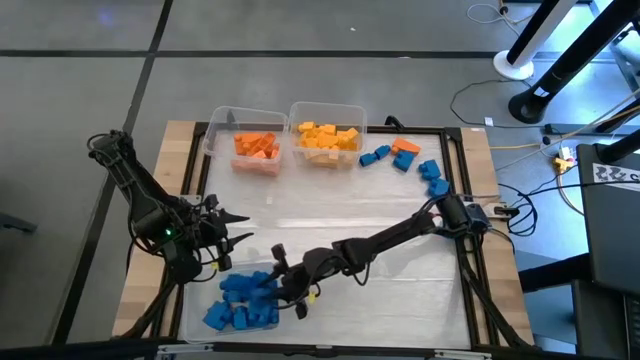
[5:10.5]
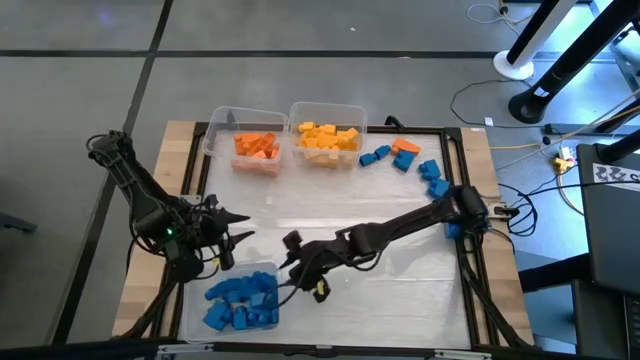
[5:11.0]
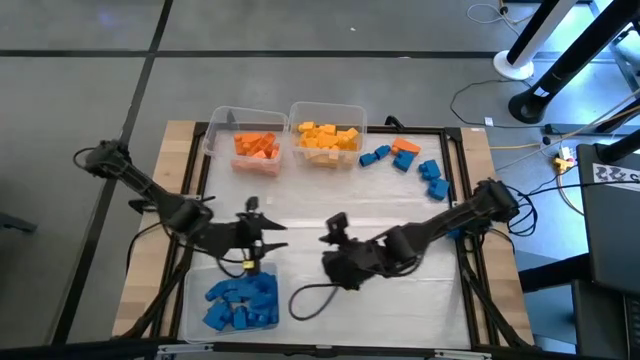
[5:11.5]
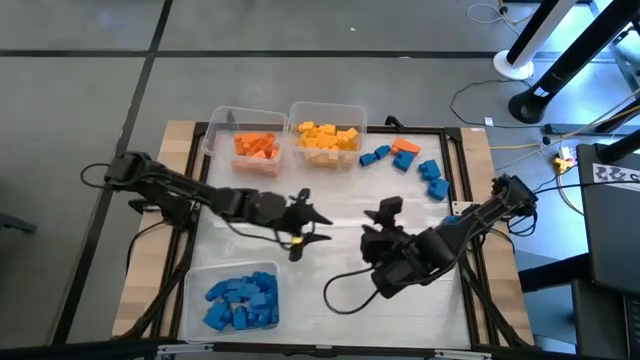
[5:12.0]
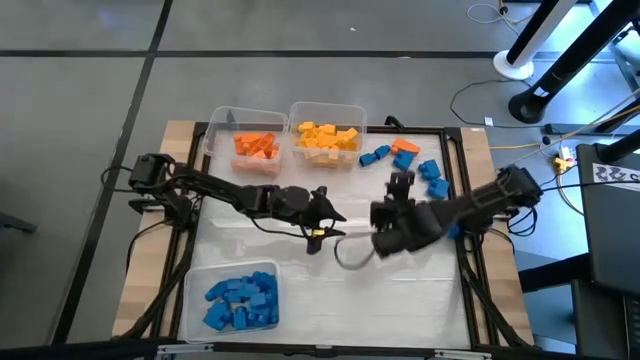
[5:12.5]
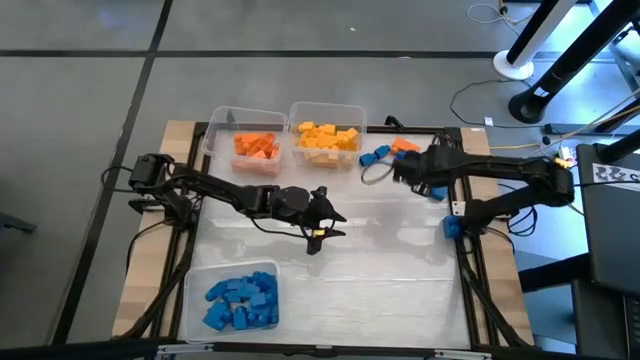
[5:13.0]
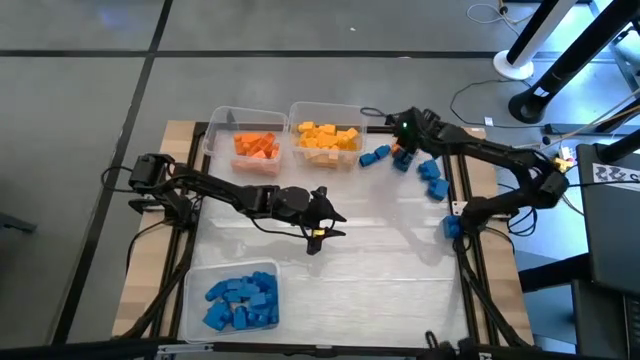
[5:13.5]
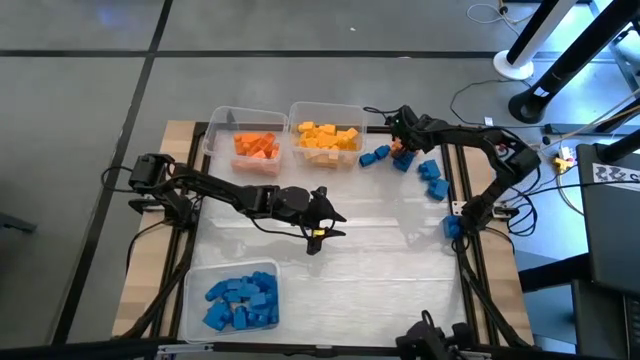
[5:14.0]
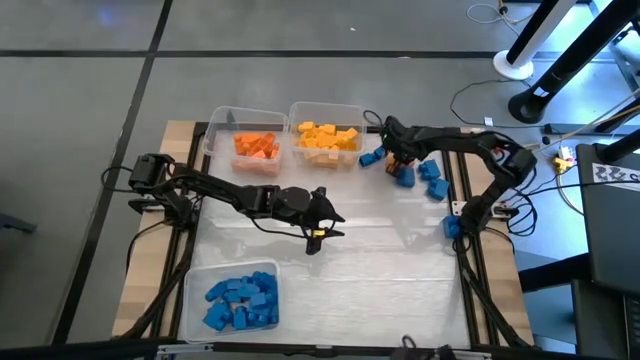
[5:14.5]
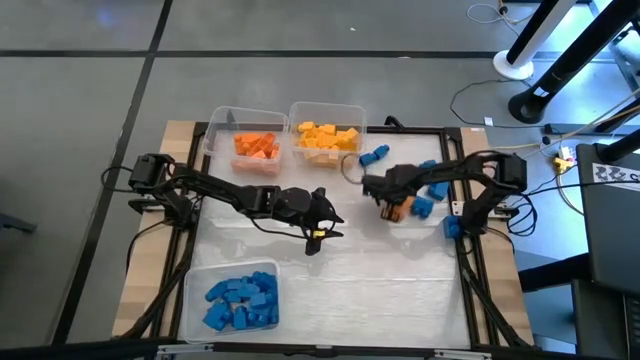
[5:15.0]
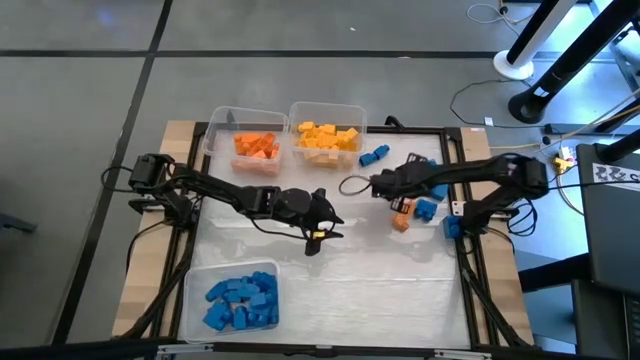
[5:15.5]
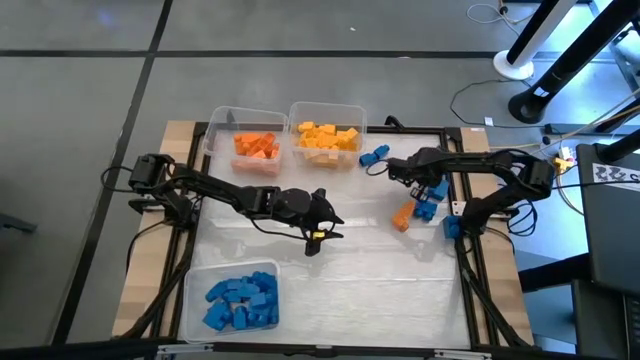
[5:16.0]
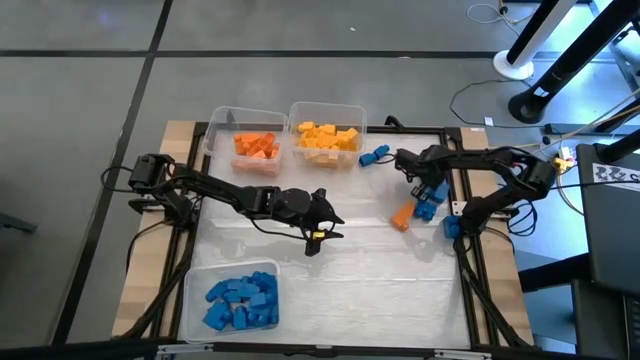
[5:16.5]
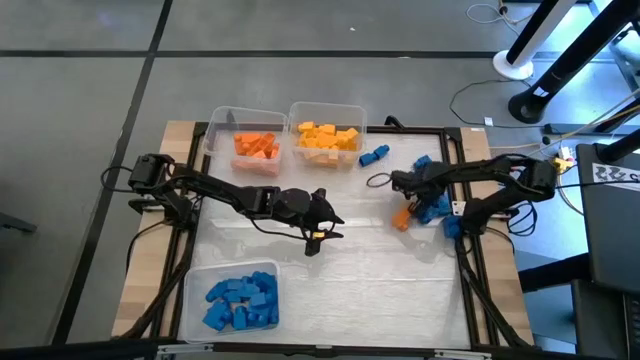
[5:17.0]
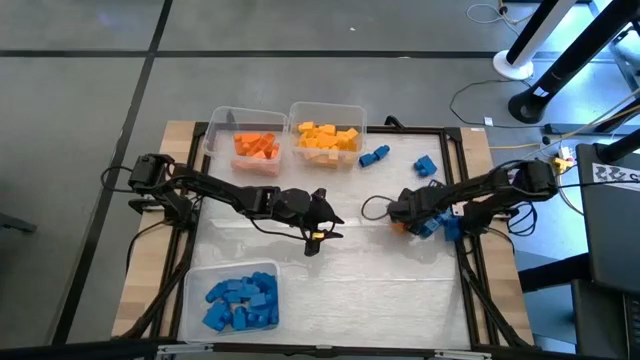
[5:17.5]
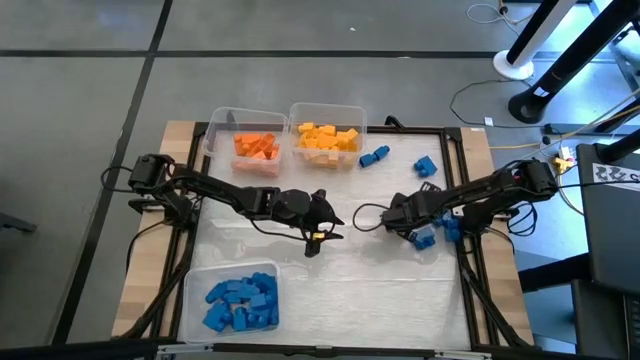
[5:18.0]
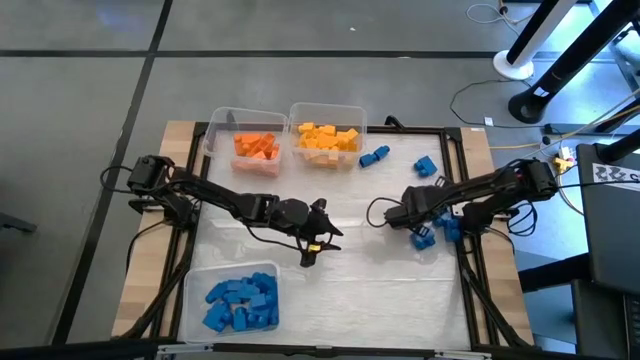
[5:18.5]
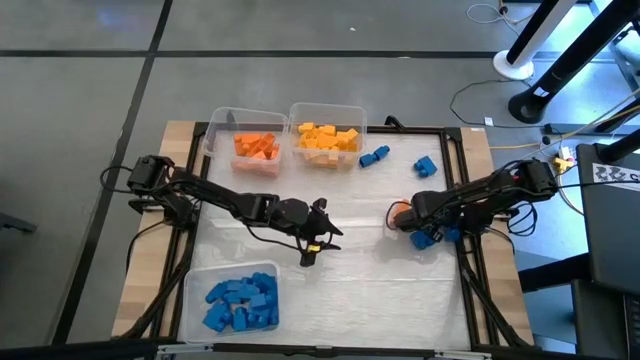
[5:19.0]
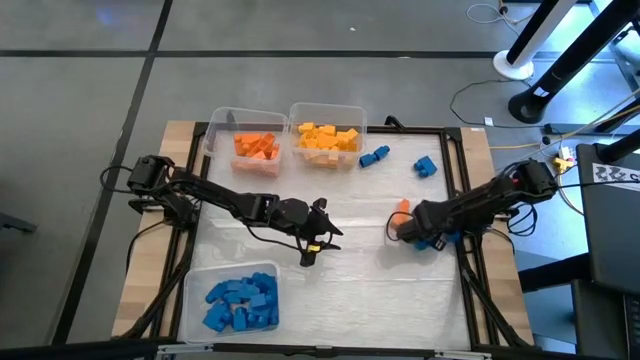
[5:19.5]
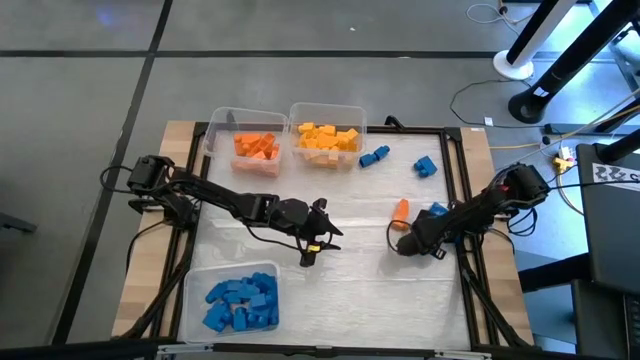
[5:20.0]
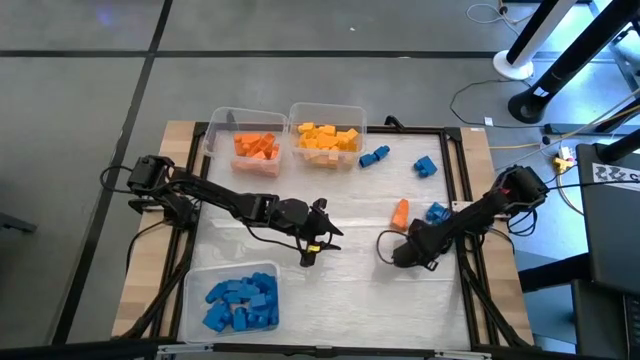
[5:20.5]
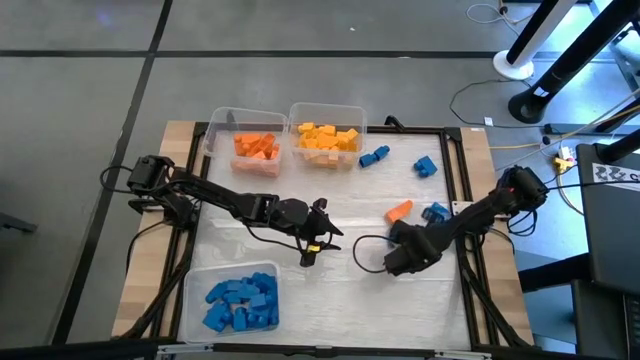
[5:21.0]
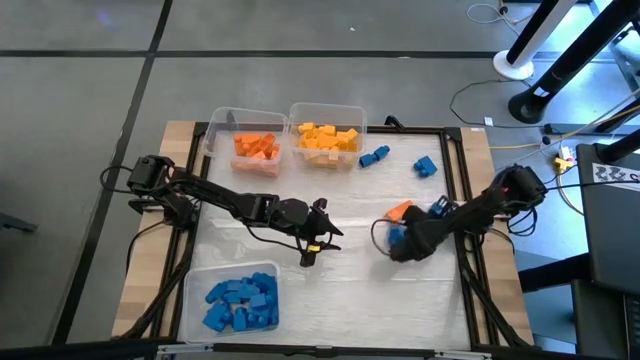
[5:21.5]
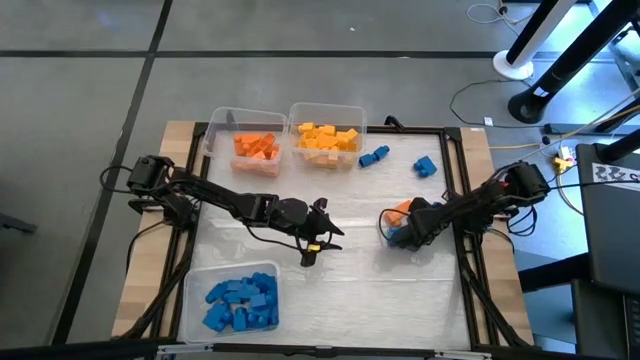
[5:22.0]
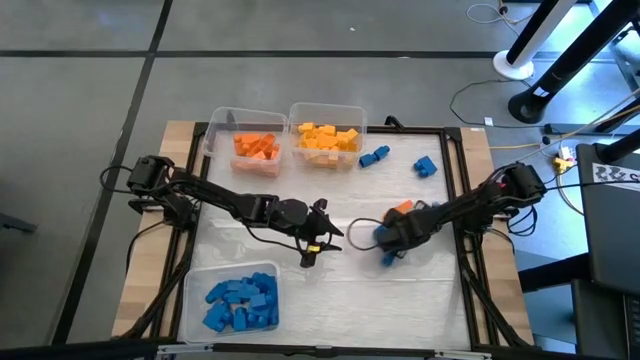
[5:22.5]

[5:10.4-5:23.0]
Task: Sort blocks
Put the blue game piece into the bottom transparent bin

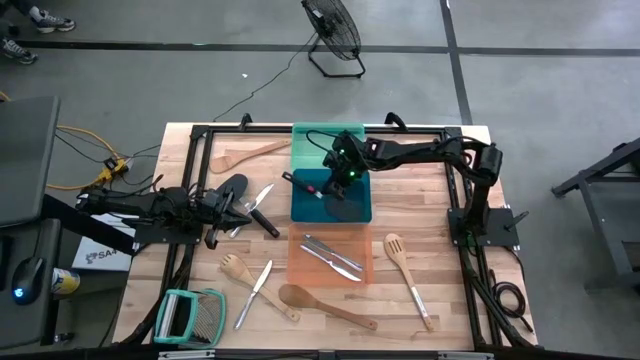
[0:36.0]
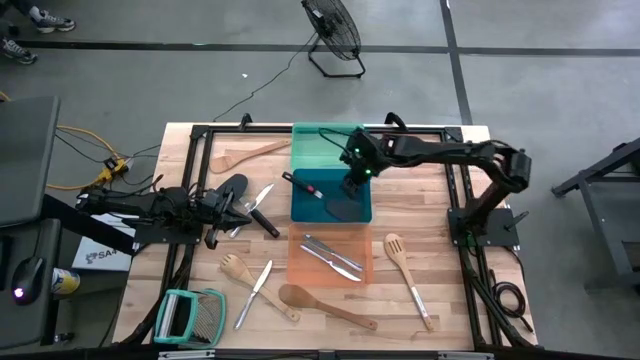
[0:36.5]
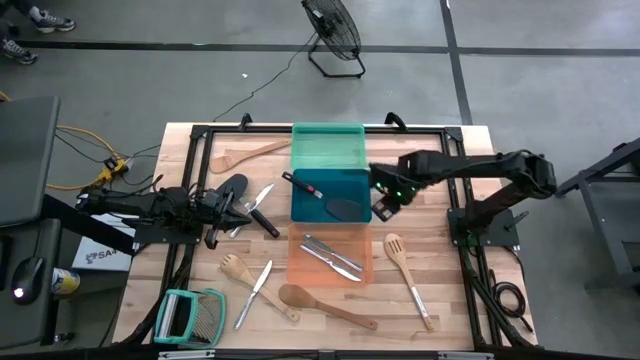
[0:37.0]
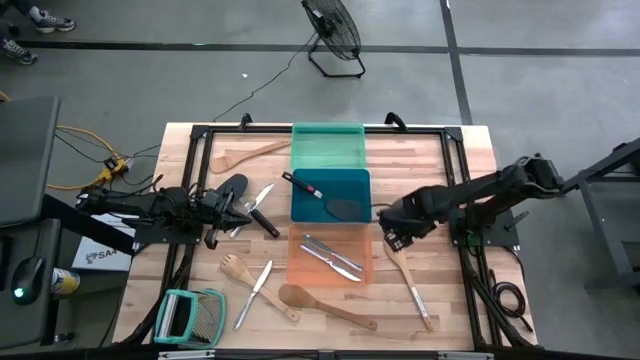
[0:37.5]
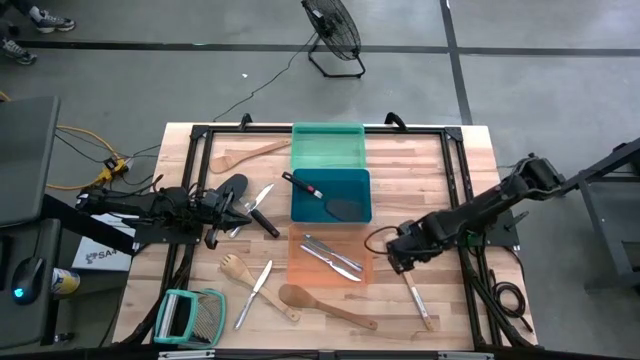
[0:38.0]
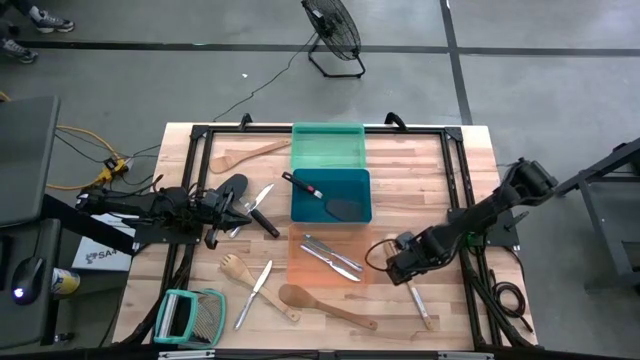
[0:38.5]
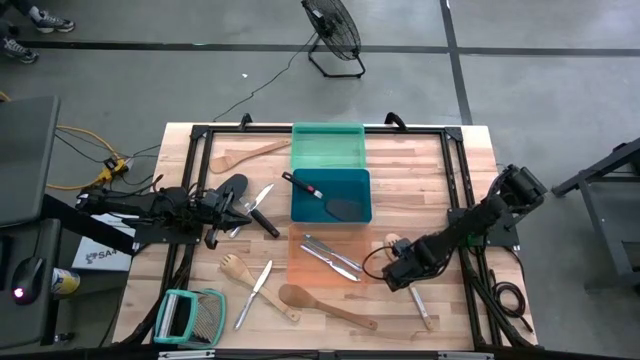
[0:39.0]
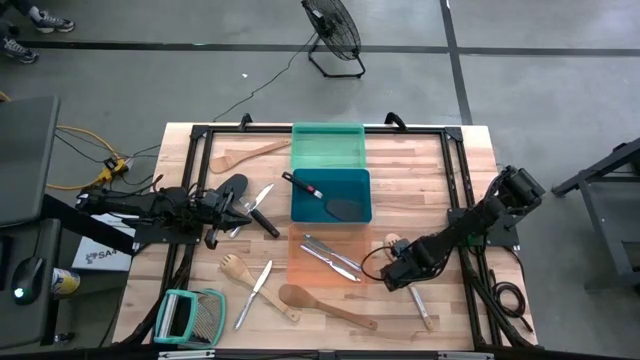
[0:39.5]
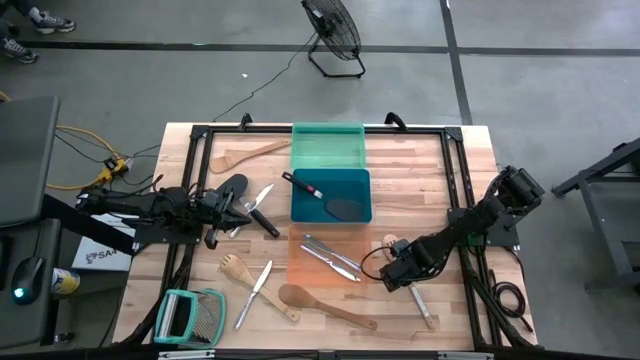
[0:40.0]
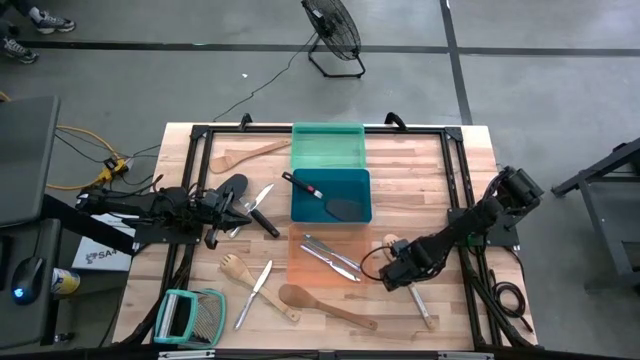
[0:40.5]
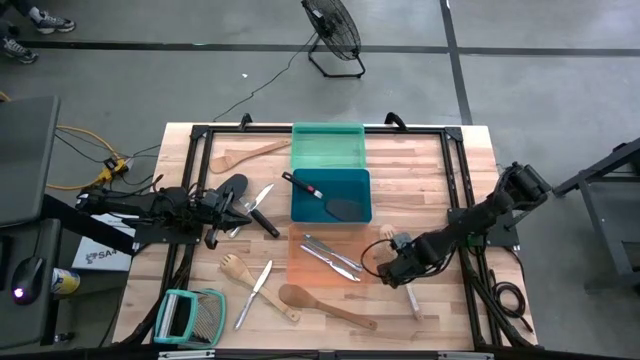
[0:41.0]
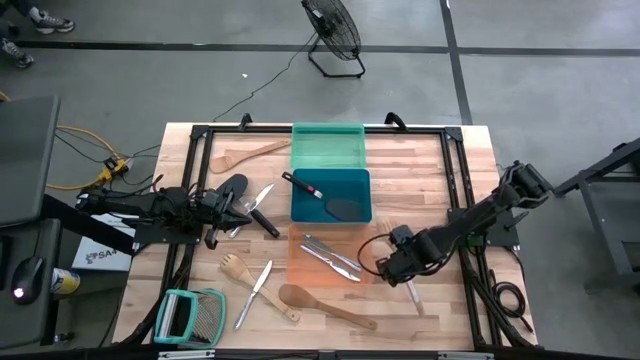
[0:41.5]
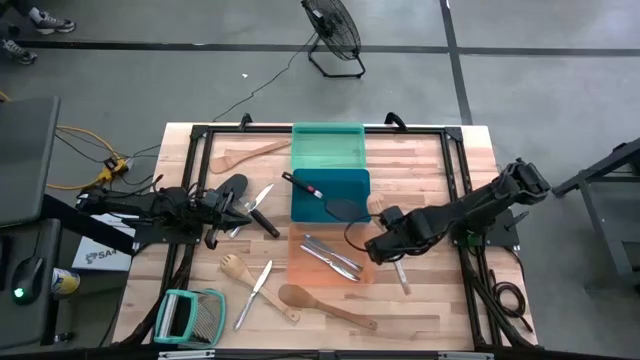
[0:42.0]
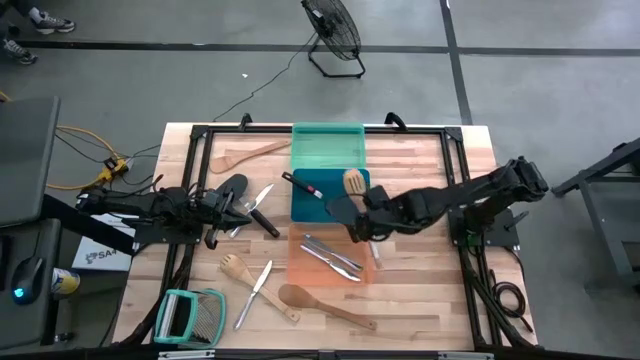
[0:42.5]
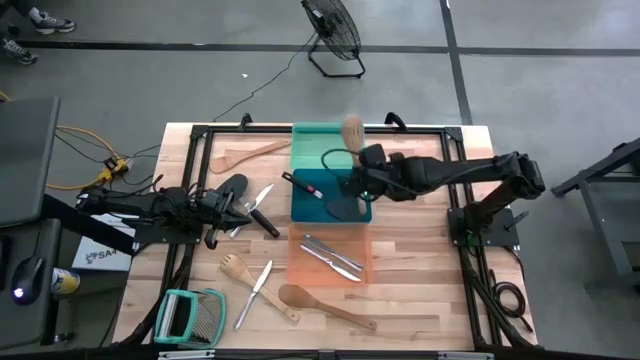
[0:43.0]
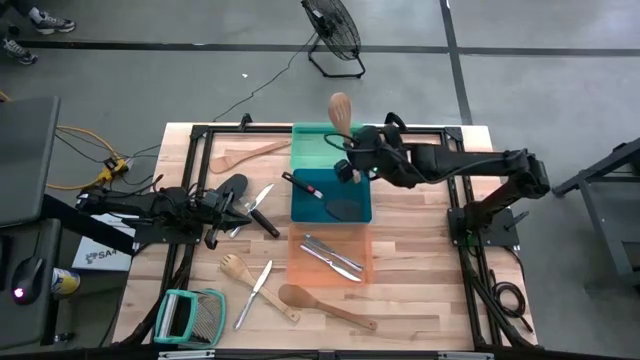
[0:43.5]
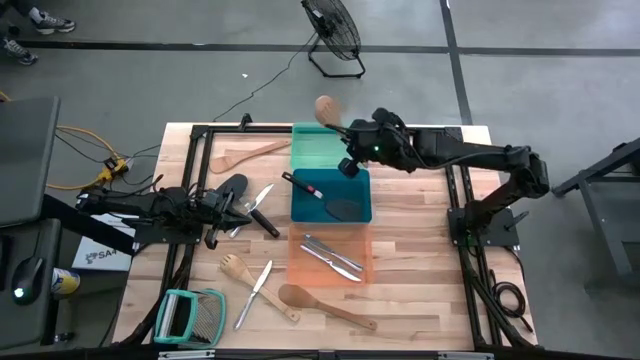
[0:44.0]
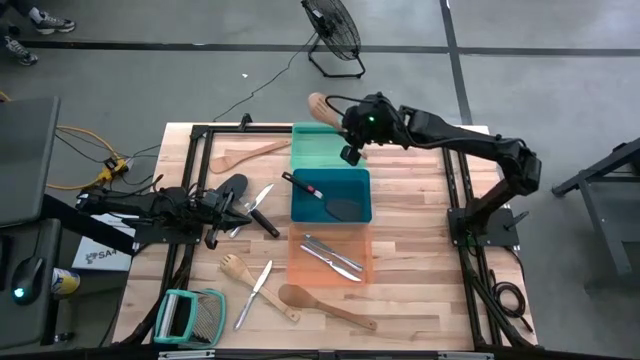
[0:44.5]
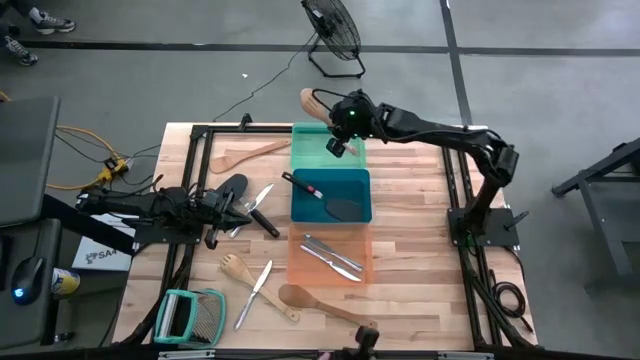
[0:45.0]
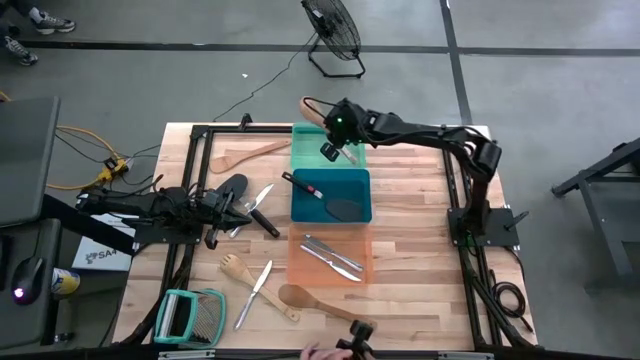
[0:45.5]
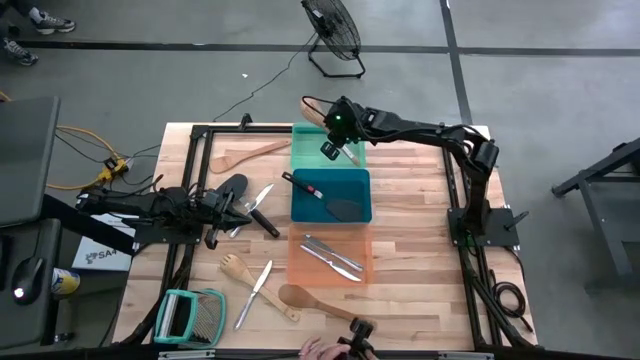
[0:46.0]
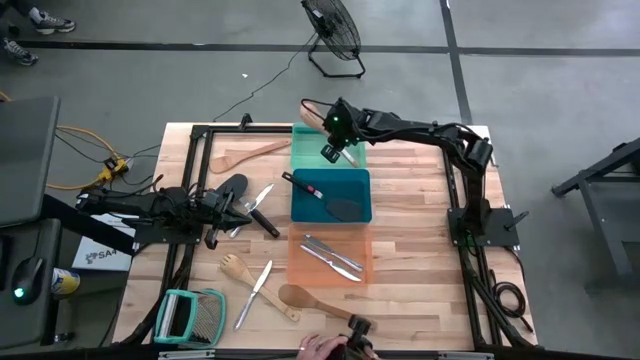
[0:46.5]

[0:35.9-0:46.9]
Task: Pick & Place Kitchen Items
Put the wooden serving spoon into the green bin
